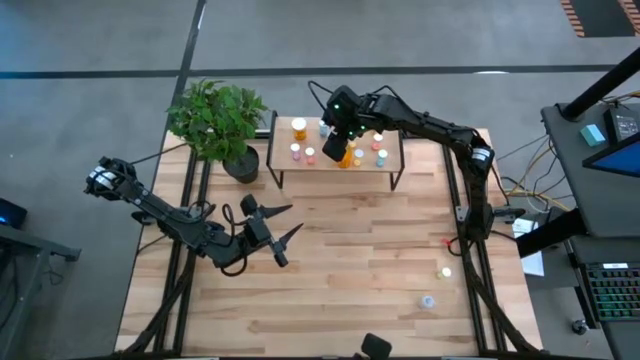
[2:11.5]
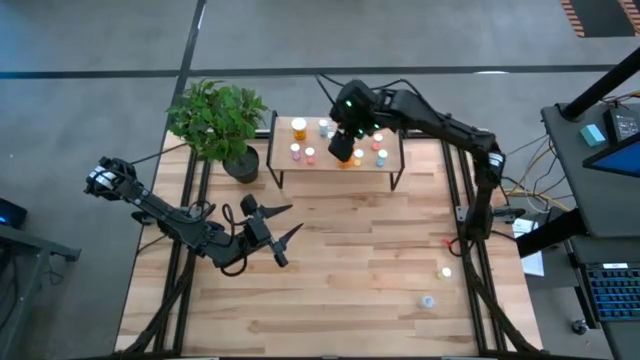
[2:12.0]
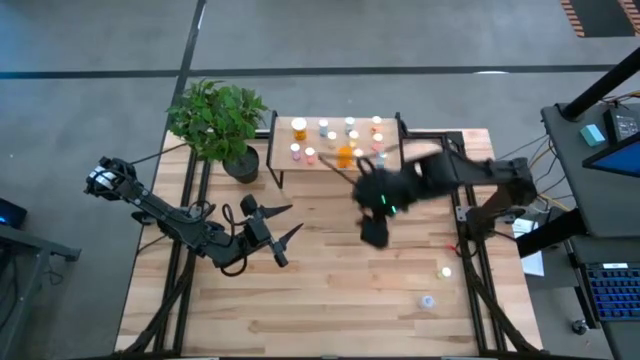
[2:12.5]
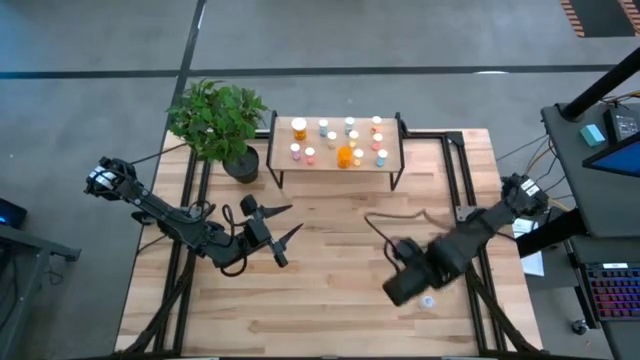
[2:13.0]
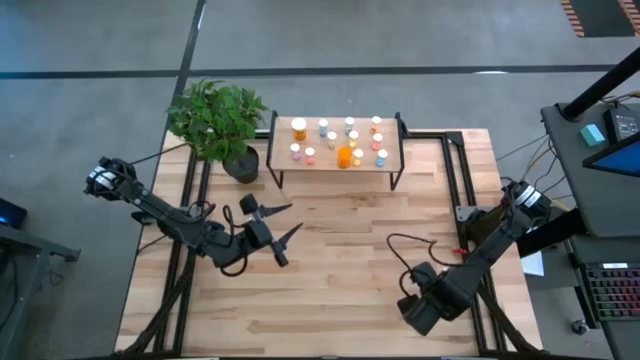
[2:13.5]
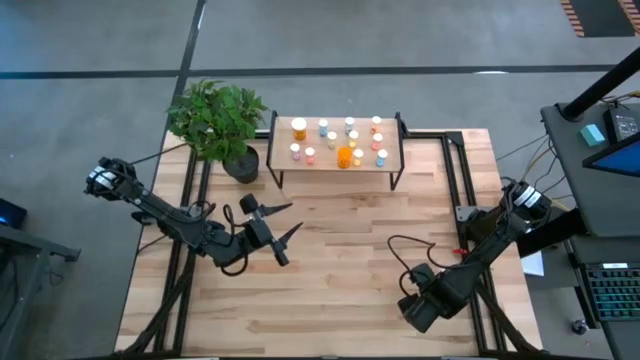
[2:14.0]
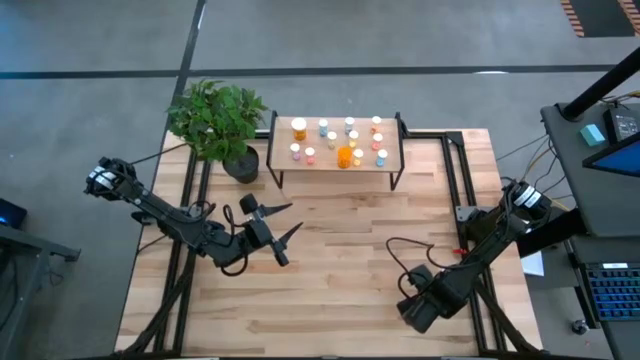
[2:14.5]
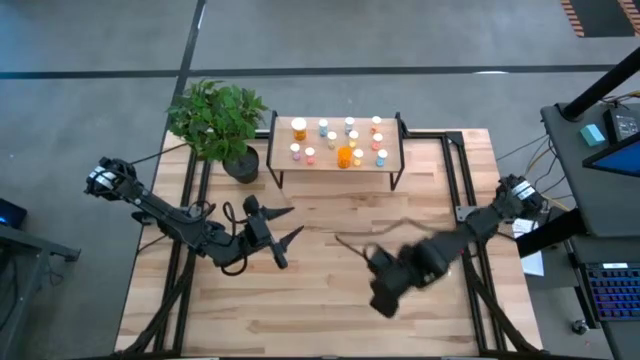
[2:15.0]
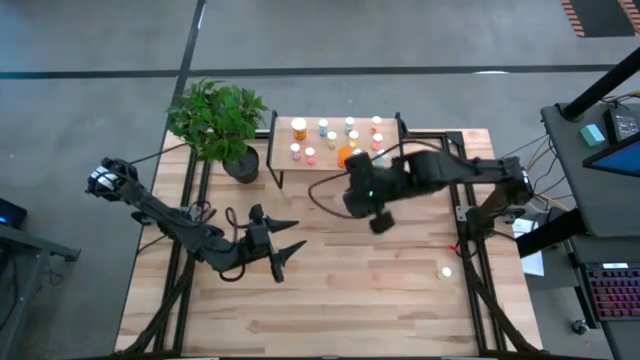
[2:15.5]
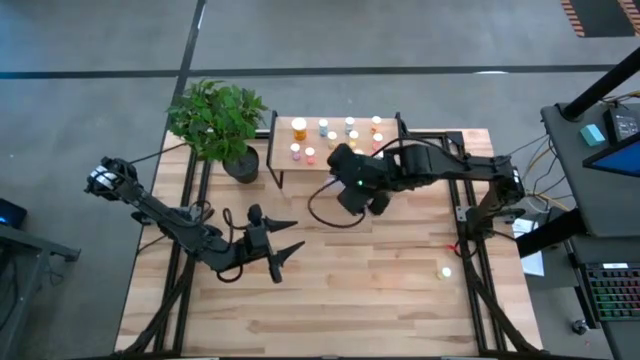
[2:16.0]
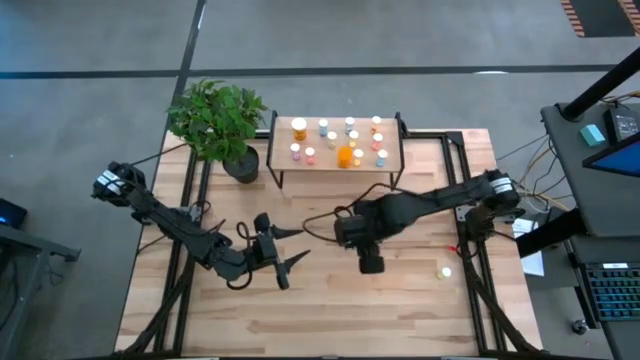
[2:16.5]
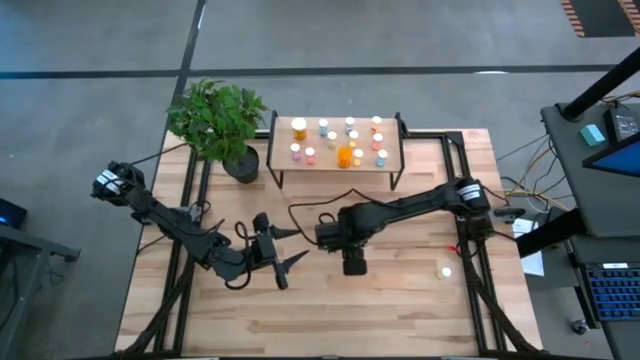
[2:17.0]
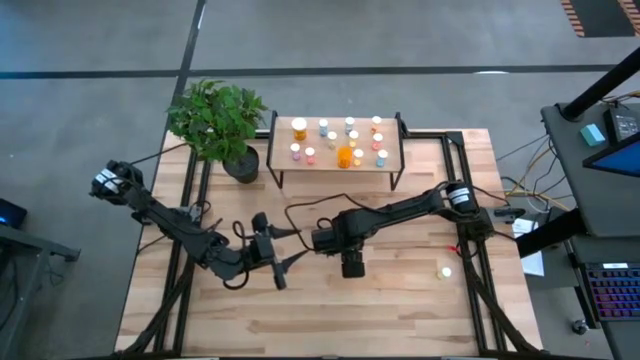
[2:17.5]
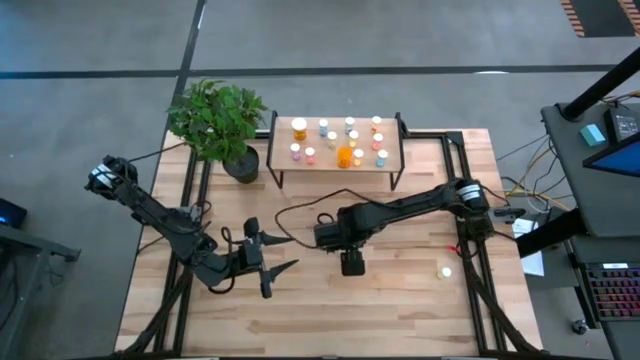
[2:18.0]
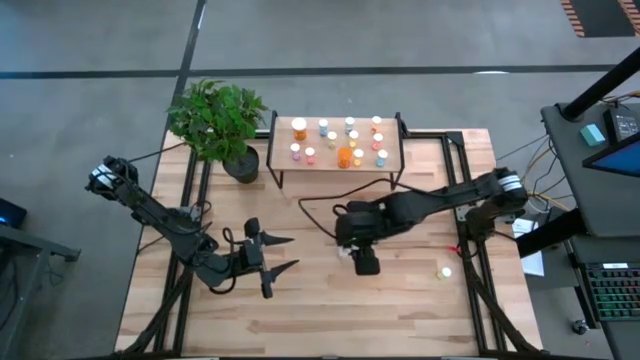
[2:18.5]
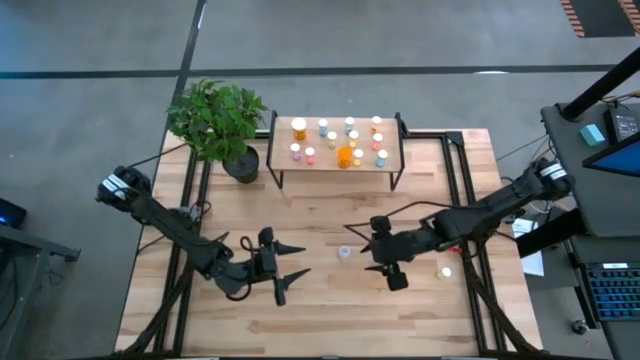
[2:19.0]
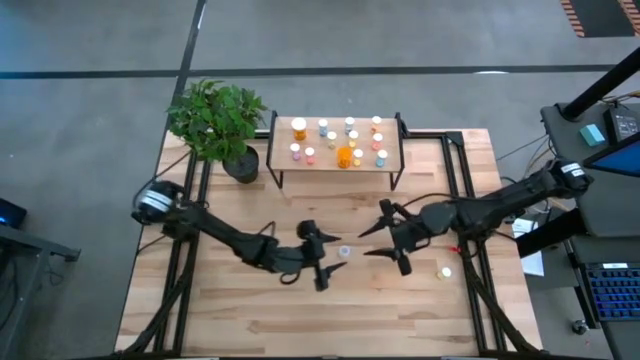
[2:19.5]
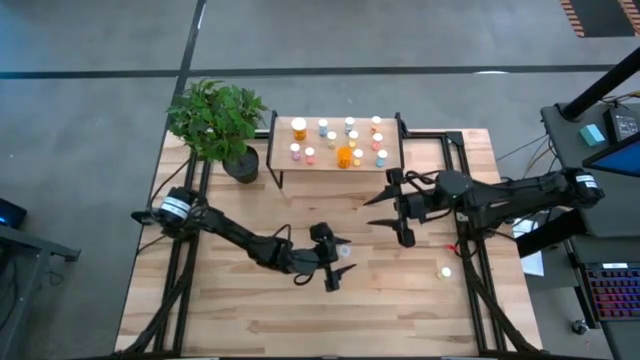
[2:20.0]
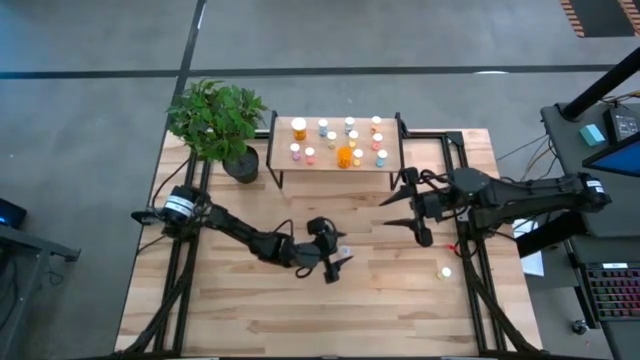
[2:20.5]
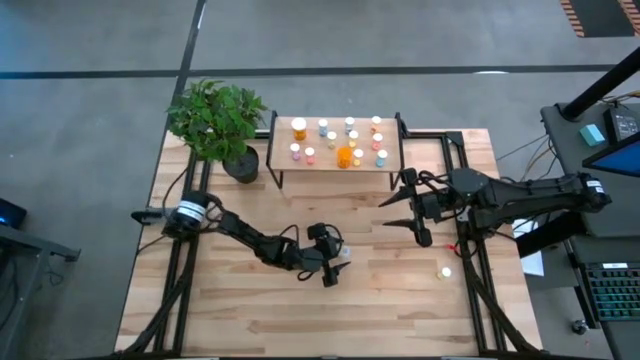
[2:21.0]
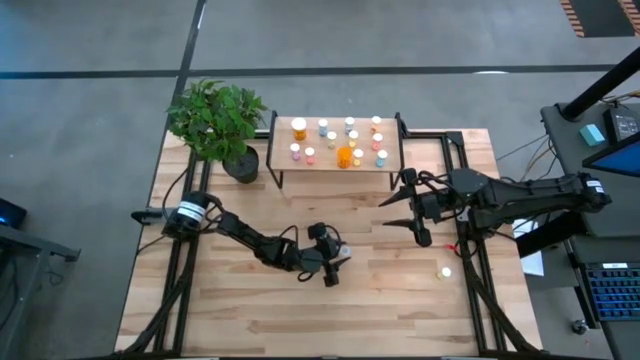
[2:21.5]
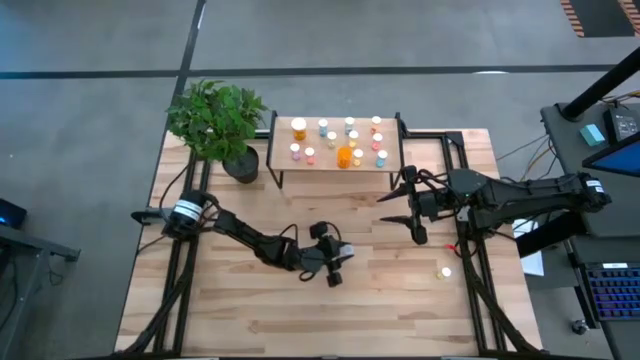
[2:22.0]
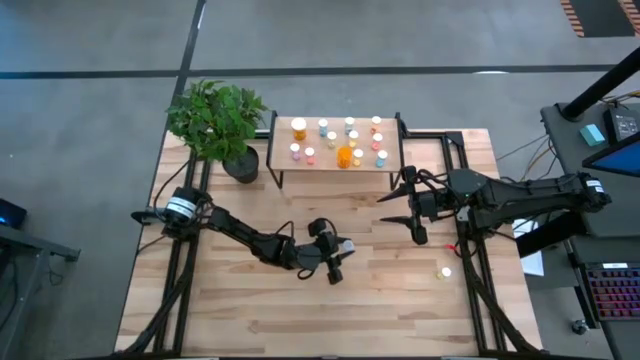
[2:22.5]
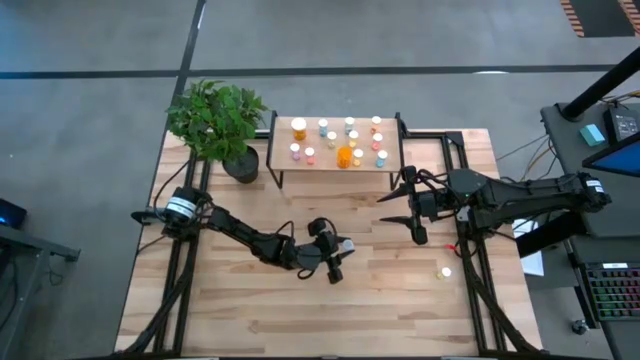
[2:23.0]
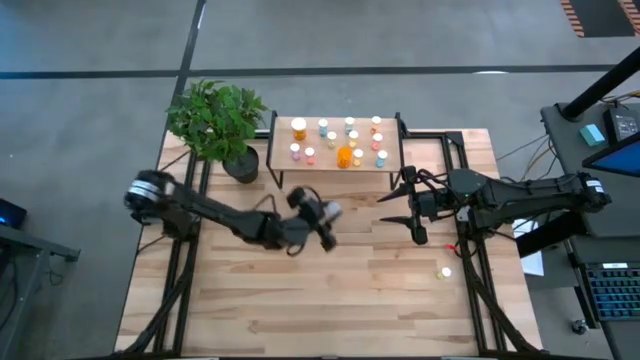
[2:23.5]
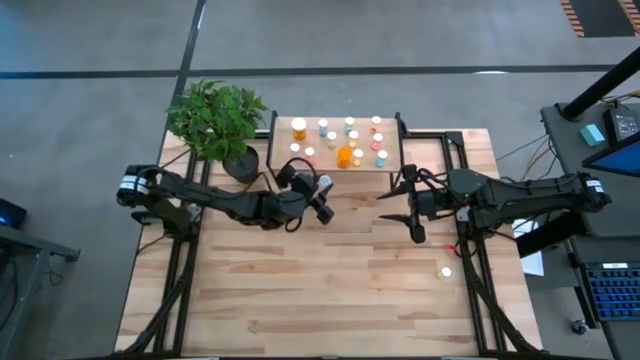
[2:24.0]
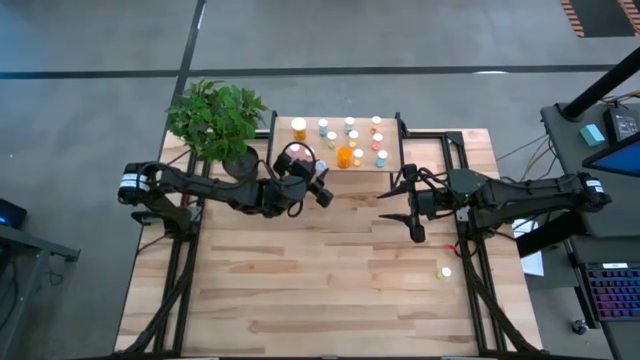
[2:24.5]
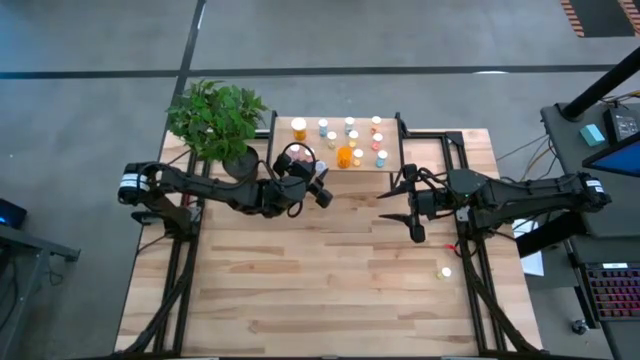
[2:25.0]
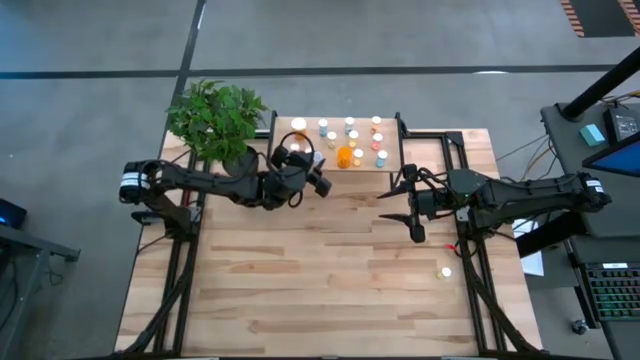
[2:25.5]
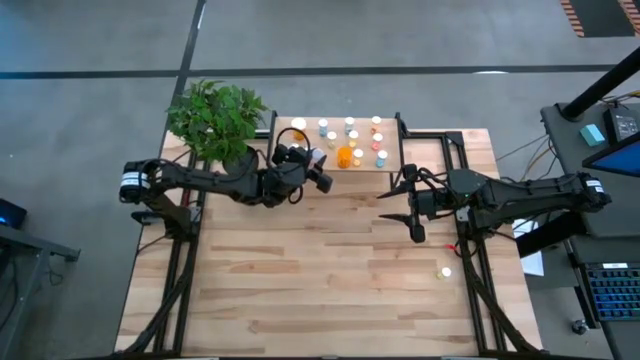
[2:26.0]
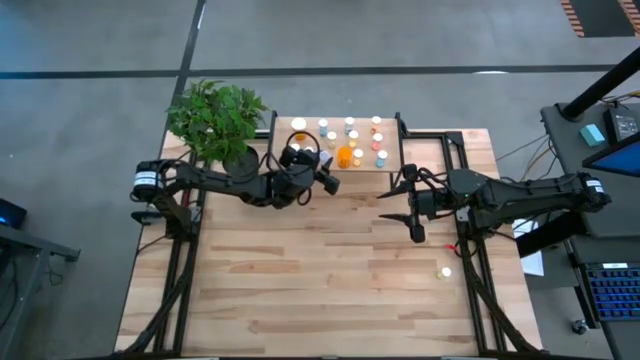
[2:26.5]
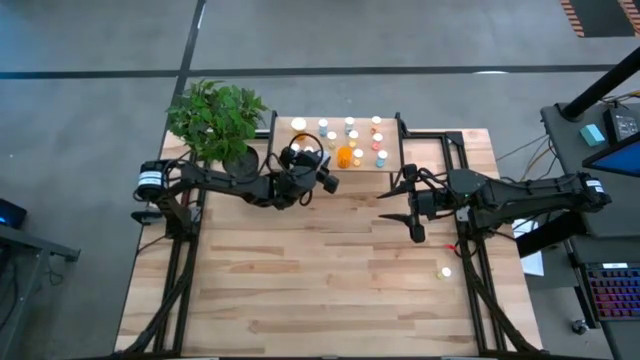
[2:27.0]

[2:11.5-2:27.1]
Task: Pick and place medicine bottles onto shelf by color
Put the transparent pill bottle on the shelf

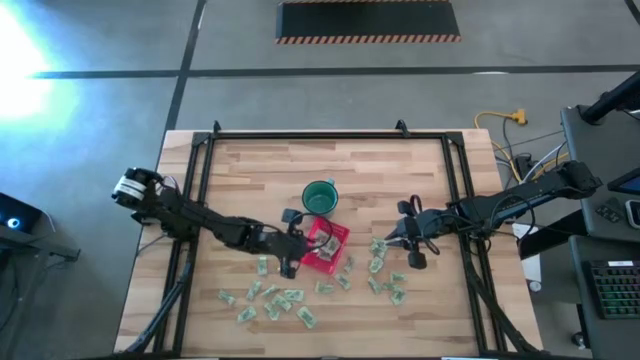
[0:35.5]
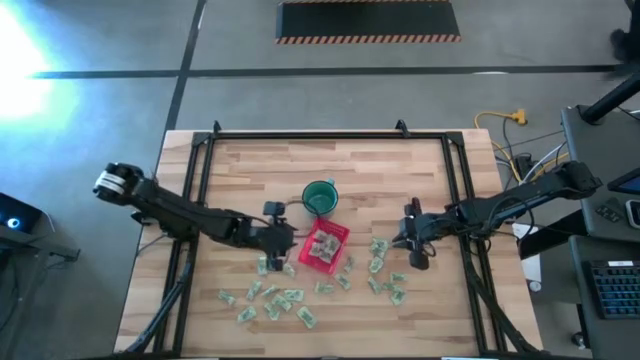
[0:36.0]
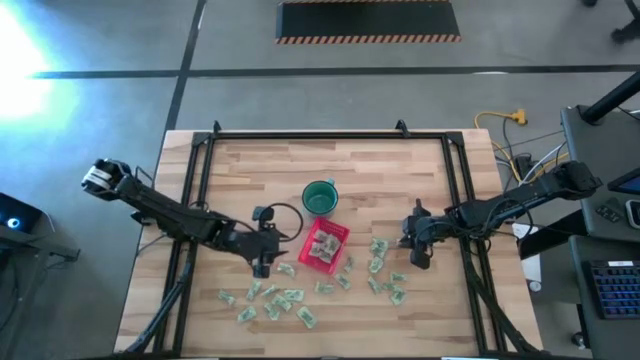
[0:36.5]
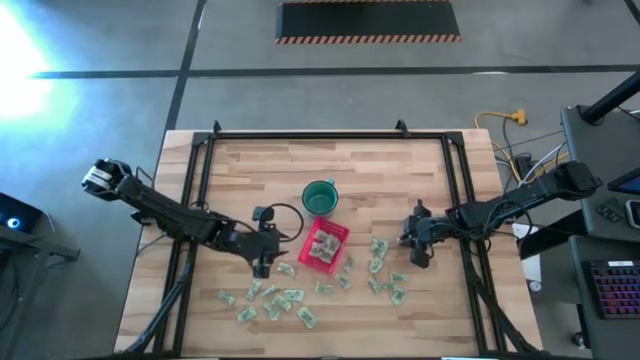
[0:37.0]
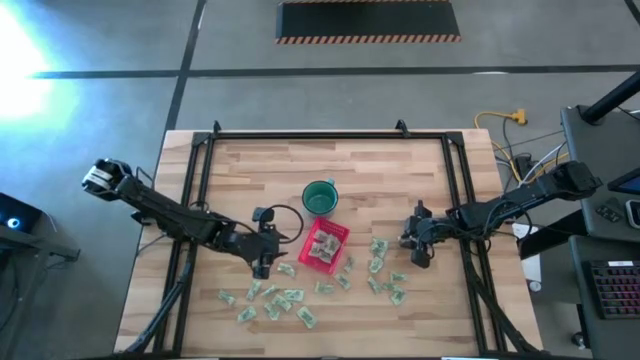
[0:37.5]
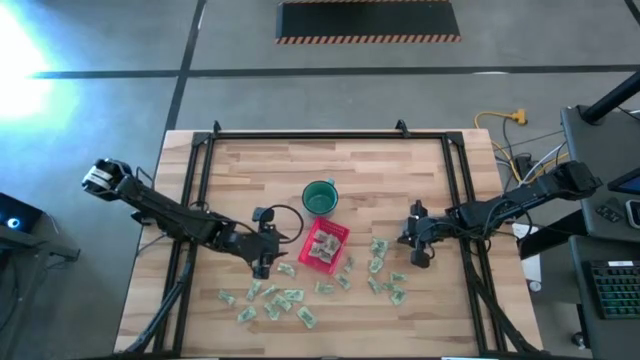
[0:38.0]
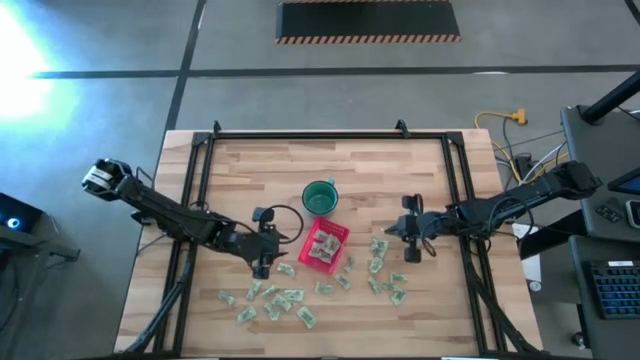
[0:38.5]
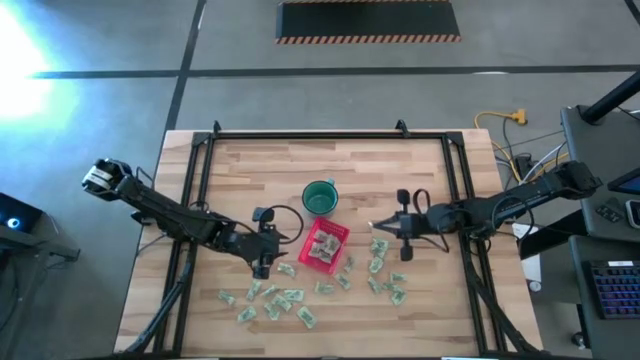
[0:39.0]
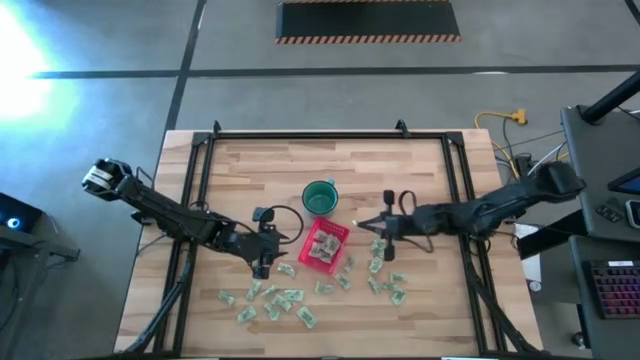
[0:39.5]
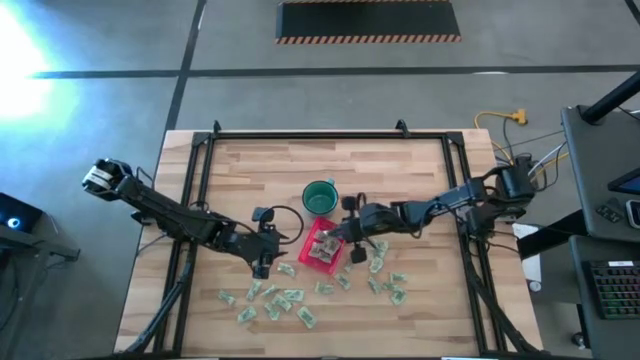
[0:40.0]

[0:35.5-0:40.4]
Task: Pick and place items into bin
Put the light green stevia packet into the red bin
